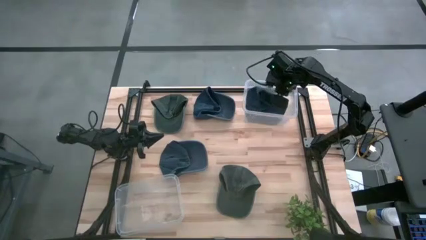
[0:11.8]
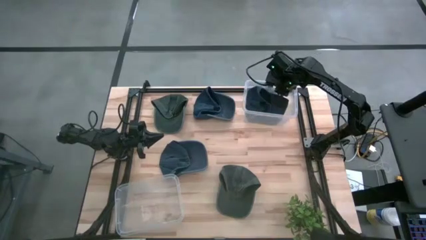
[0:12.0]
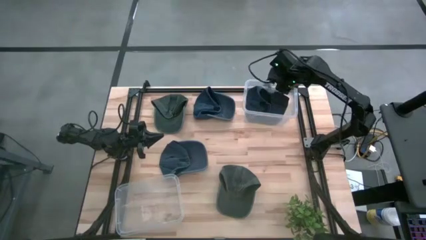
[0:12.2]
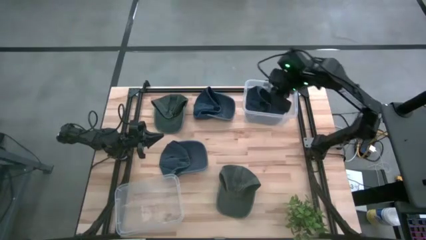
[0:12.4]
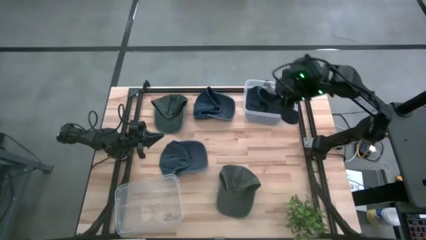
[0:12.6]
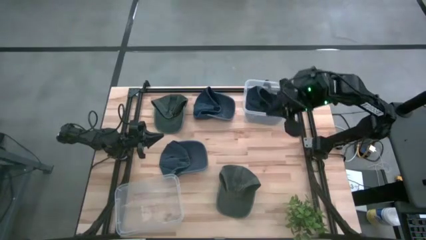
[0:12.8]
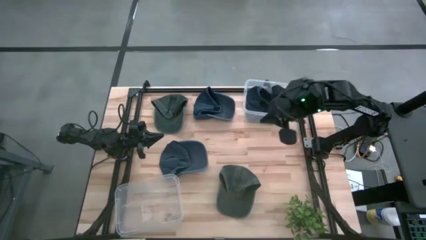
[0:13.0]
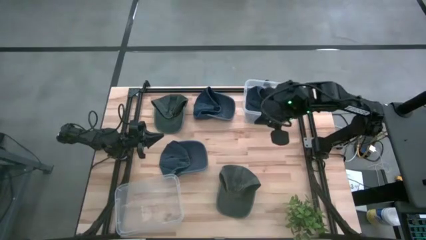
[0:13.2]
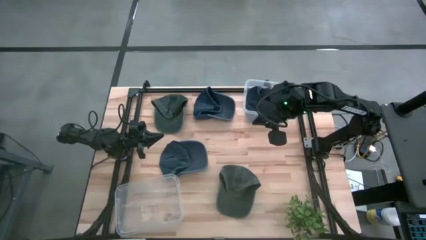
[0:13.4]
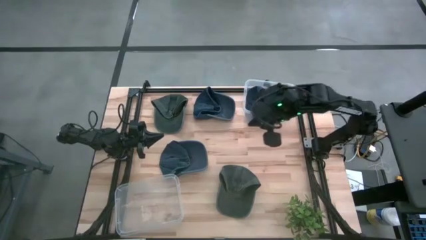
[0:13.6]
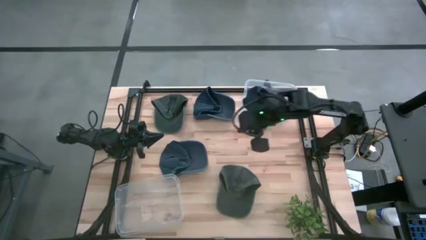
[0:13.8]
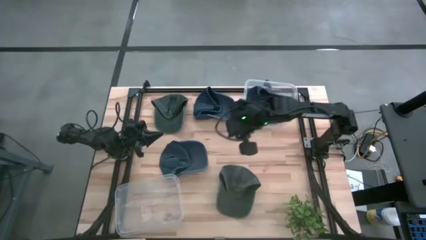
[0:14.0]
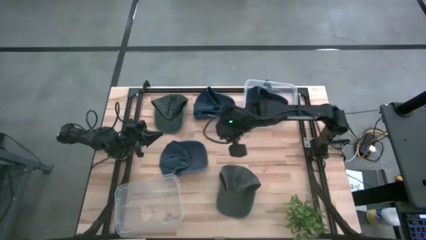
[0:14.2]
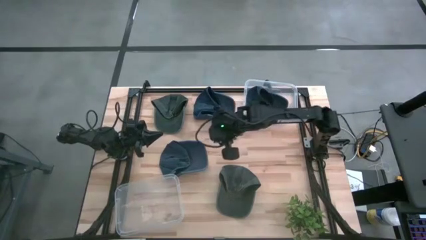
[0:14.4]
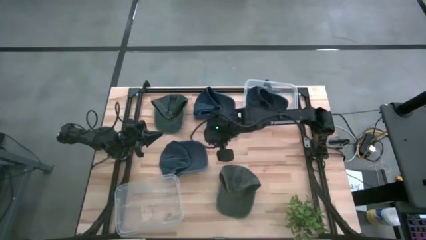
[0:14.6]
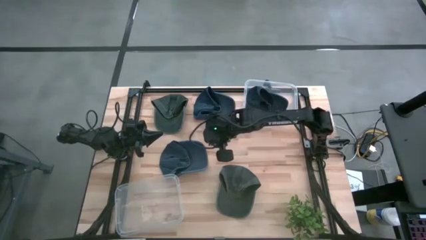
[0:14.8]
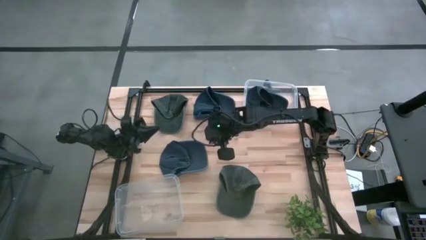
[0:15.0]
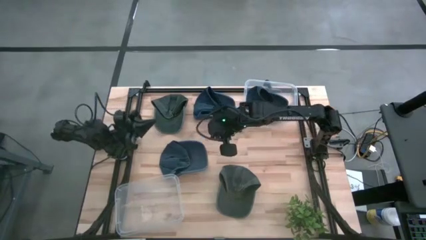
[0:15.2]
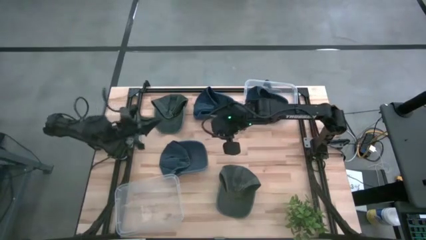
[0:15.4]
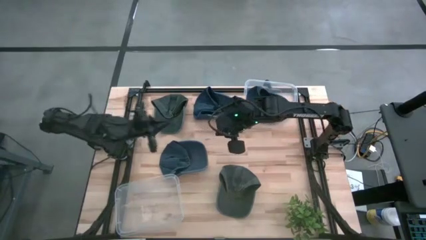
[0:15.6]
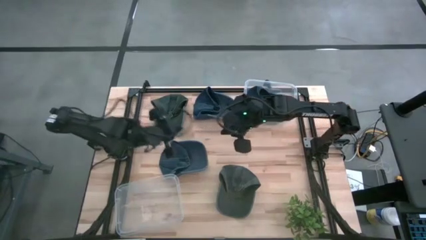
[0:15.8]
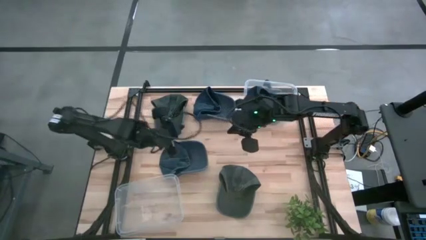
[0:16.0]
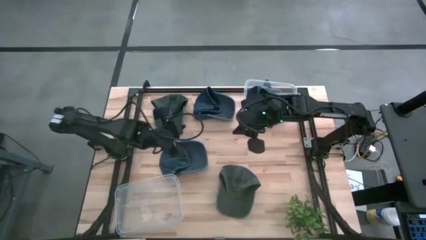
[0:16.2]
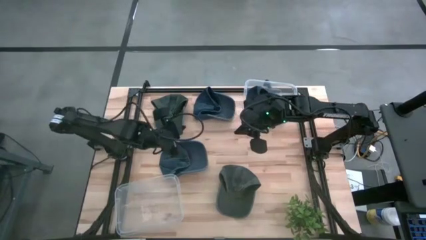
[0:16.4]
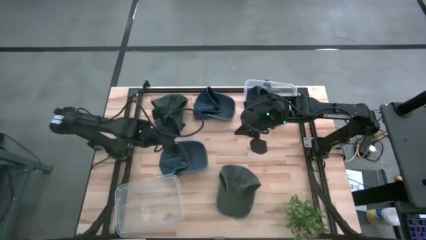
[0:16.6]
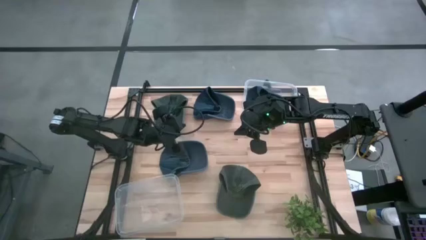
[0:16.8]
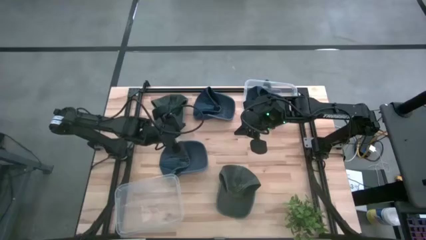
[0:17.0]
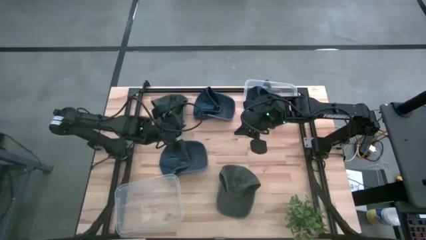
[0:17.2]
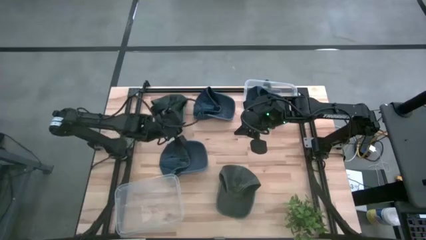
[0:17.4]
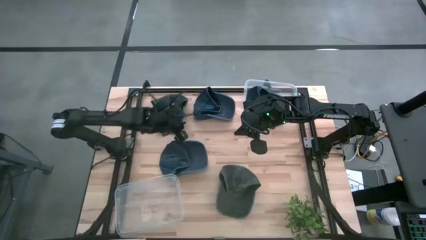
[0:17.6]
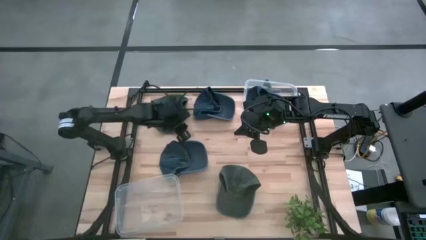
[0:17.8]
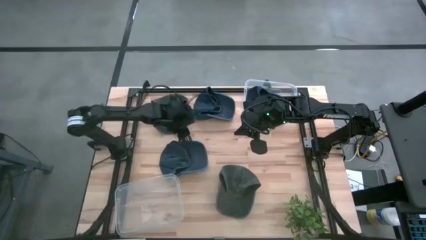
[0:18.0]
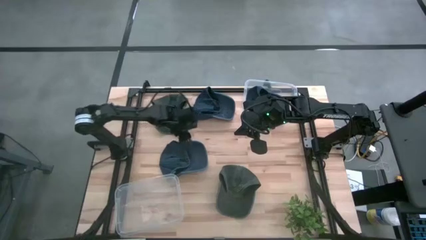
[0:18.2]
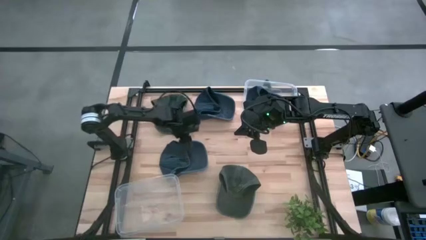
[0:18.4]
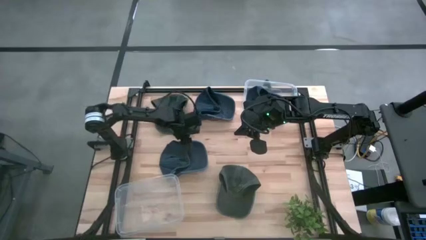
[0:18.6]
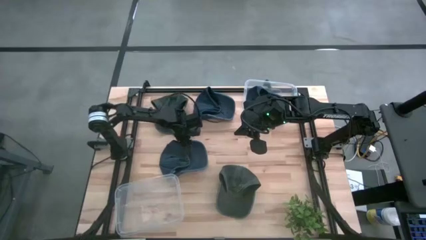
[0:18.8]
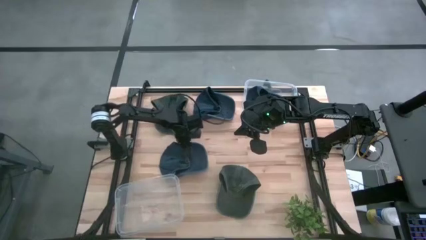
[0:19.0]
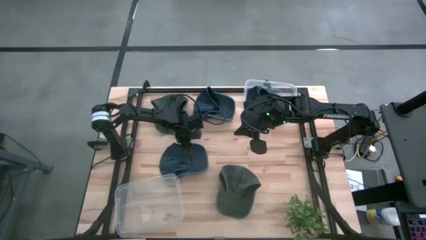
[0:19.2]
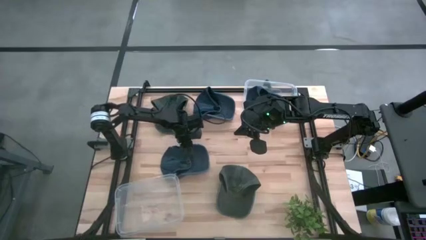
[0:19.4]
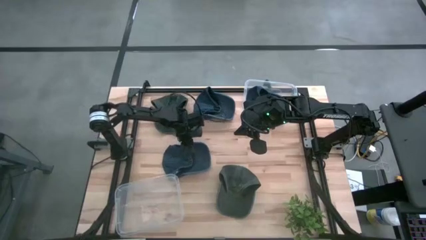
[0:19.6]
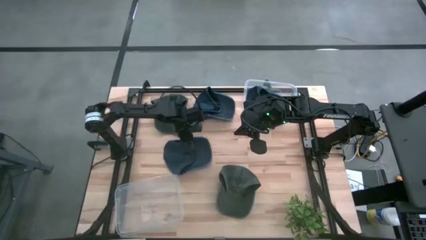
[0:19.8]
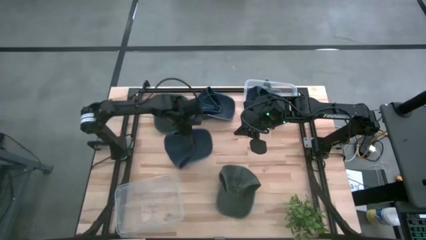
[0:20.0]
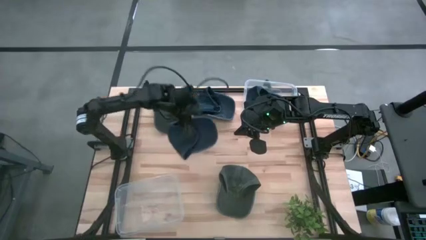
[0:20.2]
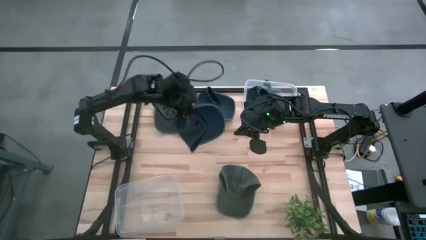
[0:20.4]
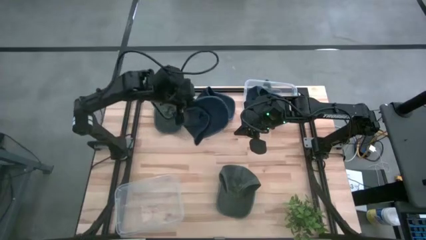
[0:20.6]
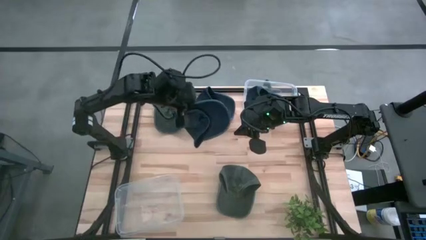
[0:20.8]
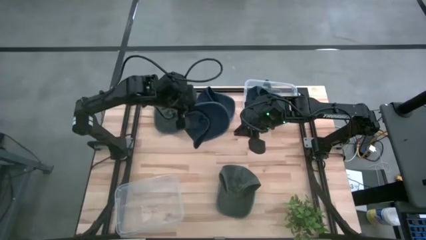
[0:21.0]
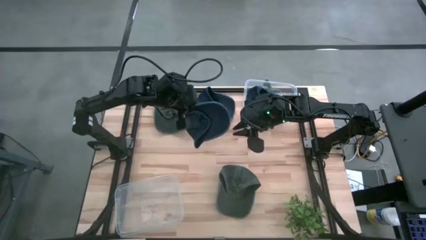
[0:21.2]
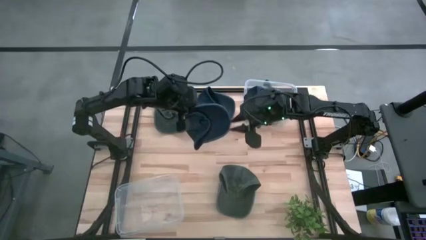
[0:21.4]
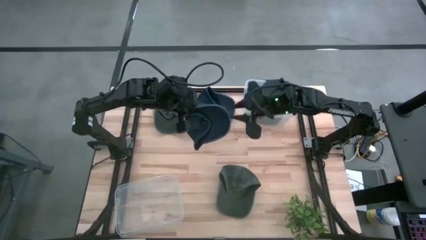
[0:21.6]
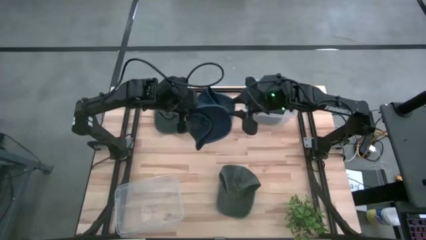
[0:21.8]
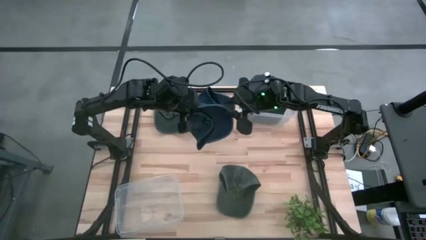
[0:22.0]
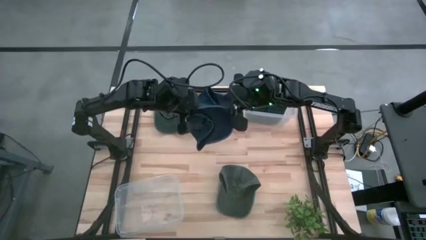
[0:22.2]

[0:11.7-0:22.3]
Task: Pick & Place hat
Put the bottom blue cap into the top transparent bin
